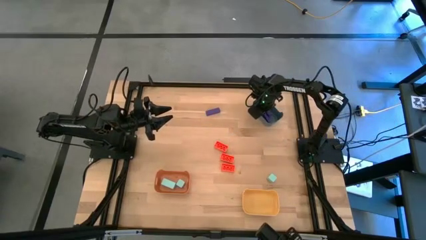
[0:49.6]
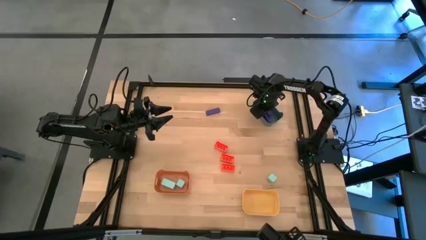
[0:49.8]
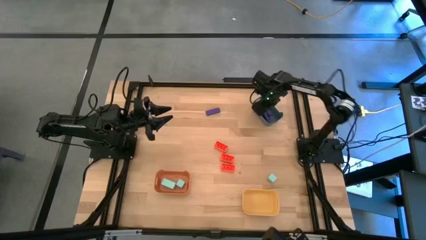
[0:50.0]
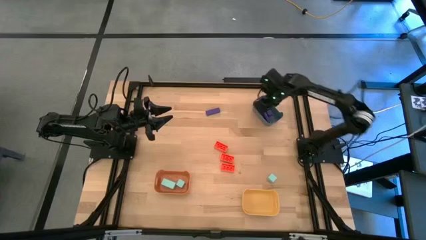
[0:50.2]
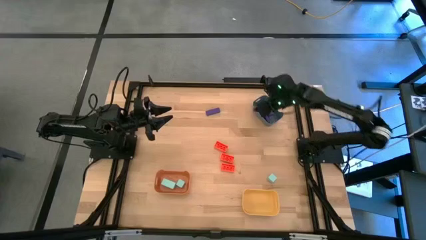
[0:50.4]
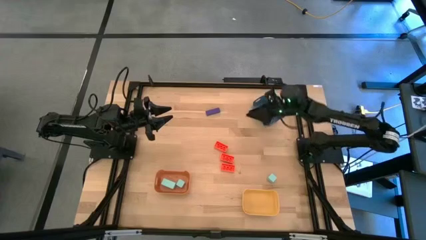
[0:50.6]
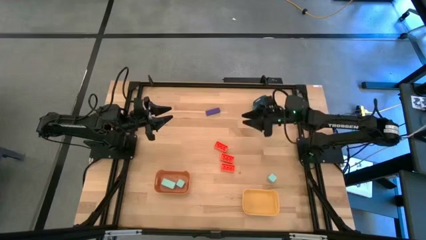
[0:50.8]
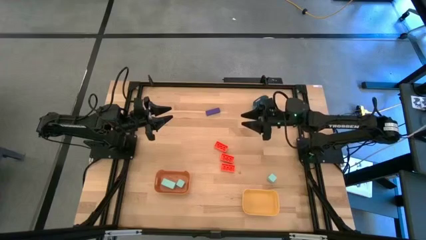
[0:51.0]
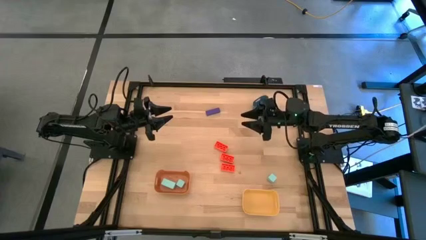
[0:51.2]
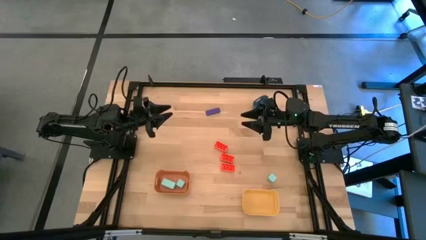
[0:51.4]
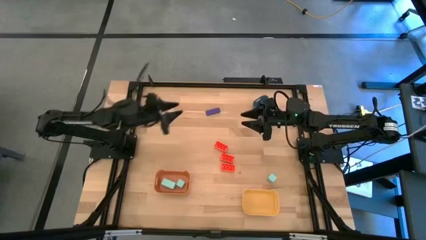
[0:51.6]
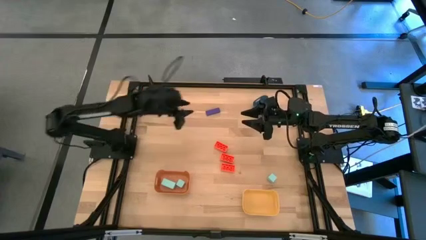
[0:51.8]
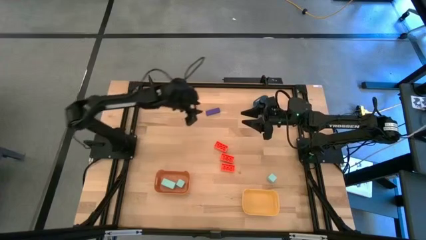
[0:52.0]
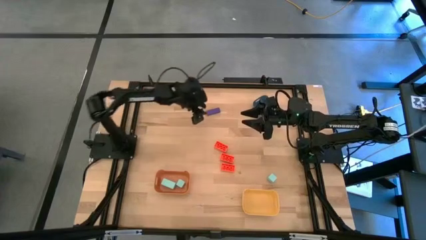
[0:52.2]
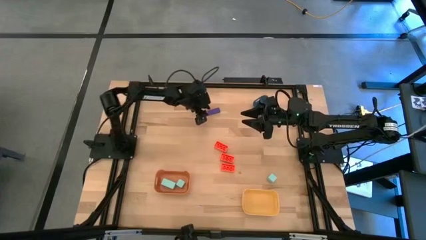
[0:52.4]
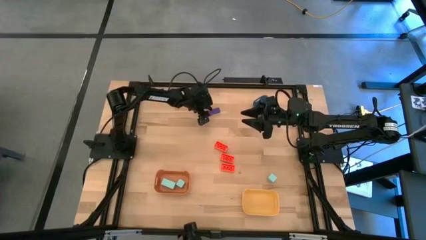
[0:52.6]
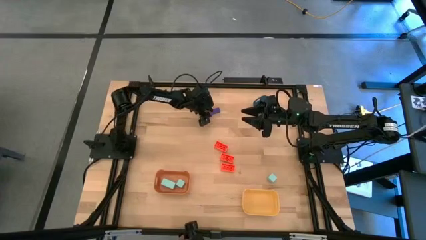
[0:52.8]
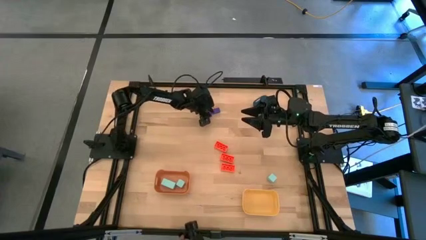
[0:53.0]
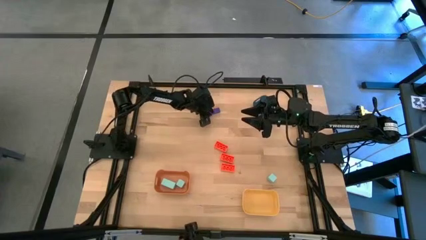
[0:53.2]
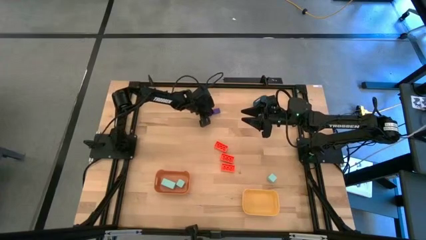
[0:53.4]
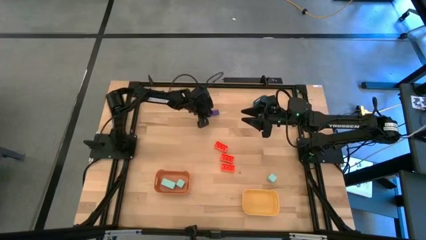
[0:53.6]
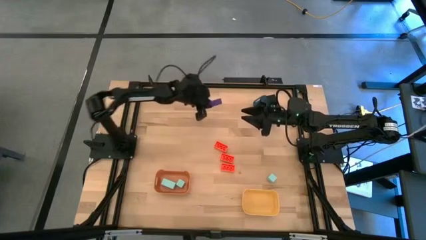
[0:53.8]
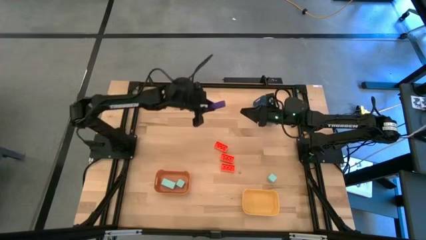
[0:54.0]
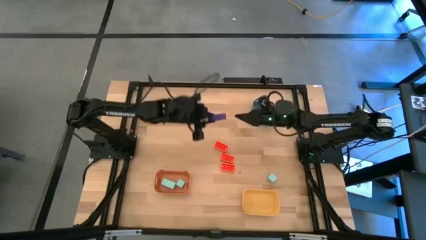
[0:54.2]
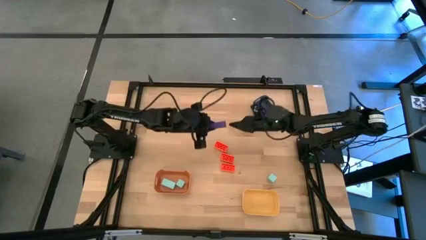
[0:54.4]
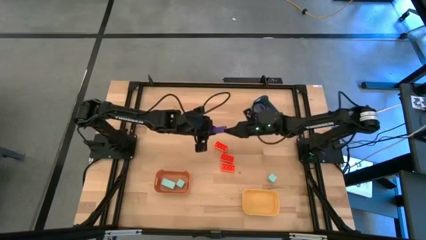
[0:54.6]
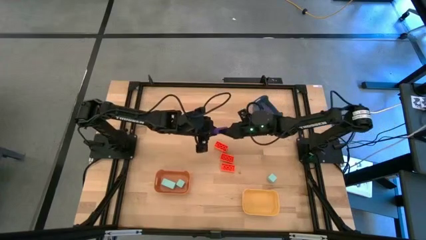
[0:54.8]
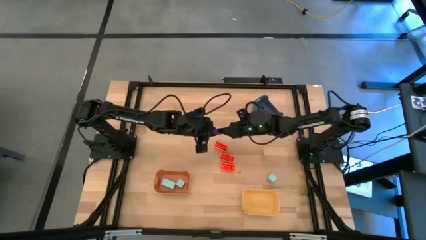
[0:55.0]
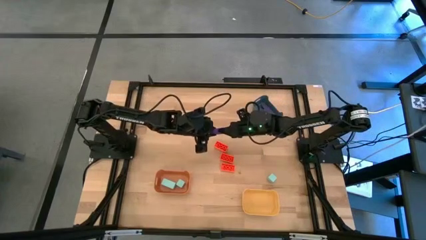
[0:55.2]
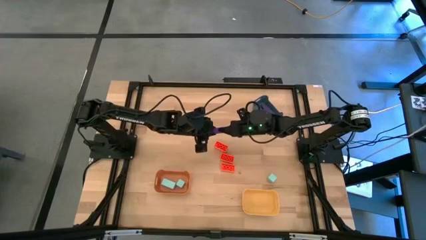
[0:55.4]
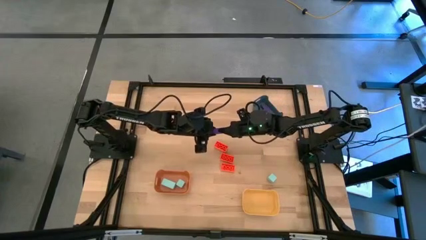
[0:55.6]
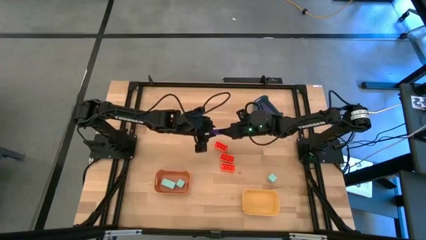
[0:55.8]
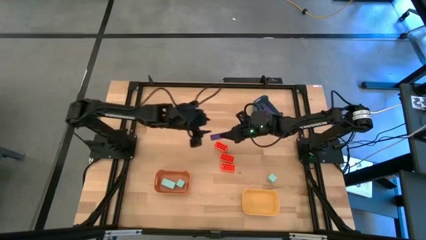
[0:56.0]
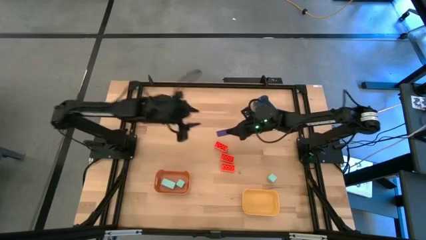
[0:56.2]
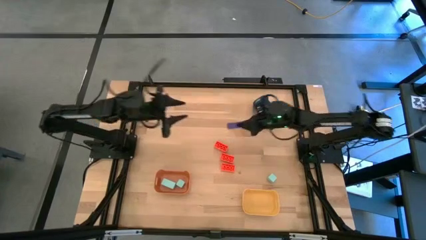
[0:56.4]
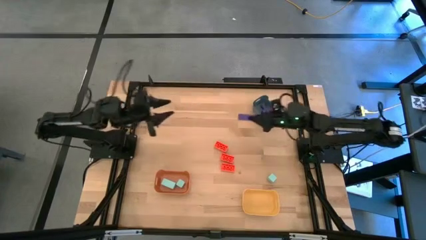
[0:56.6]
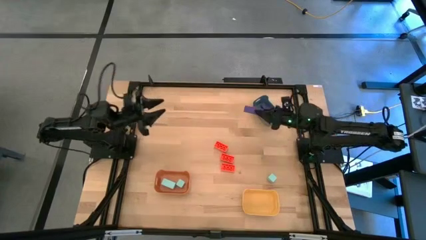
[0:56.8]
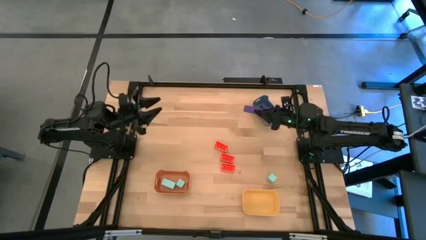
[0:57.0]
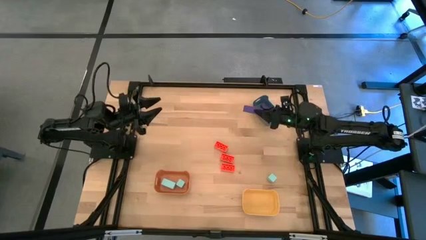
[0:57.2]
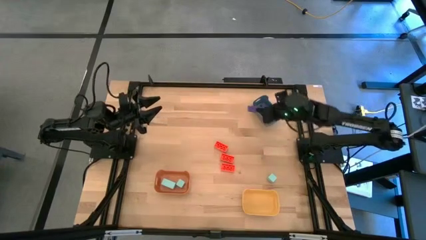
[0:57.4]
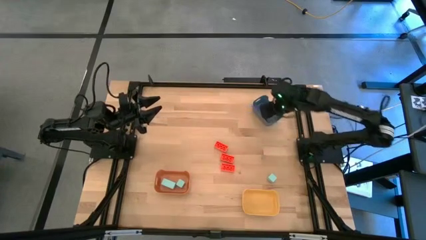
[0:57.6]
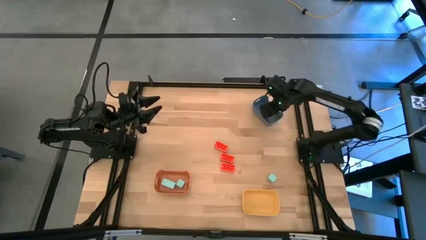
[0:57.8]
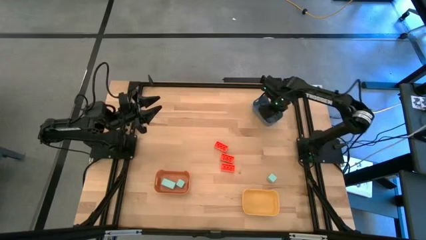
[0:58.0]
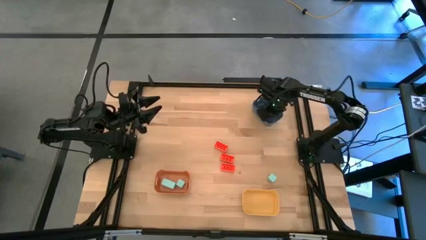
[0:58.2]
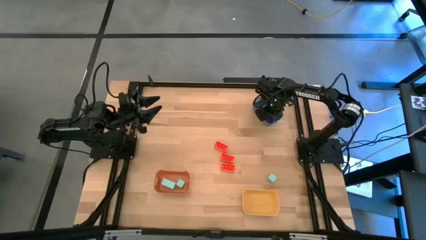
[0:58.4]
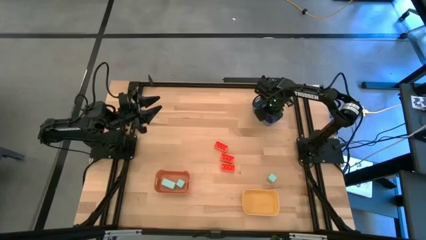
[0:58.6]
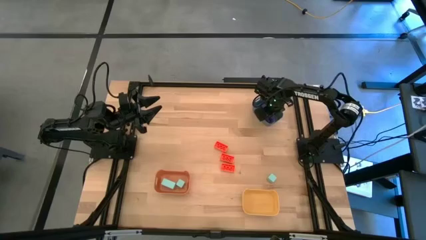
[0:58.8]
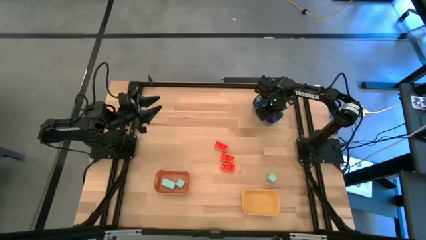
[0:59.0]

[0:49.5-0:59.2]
Task: Sort & place blocks by color
Put the violet block into the gray bin

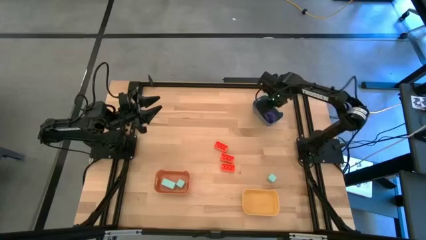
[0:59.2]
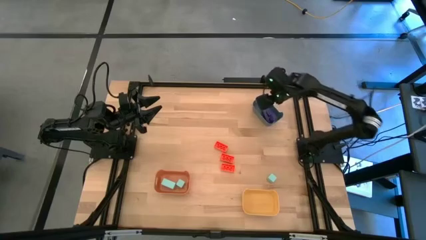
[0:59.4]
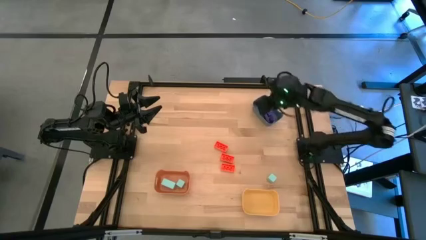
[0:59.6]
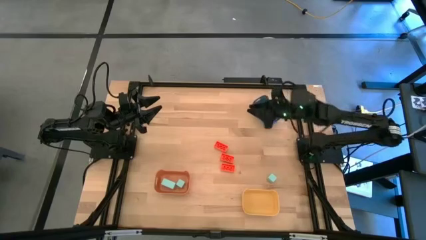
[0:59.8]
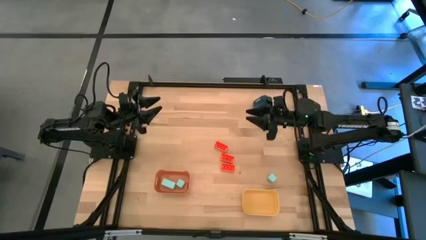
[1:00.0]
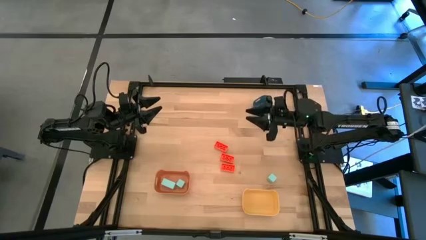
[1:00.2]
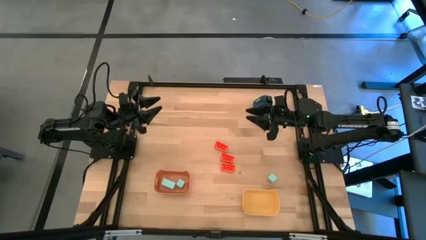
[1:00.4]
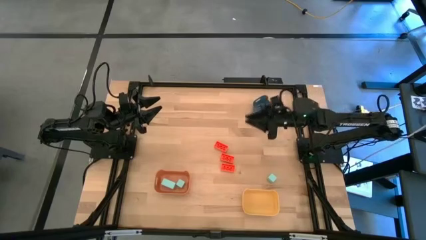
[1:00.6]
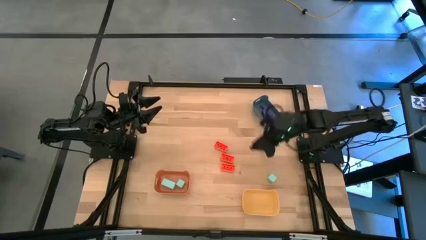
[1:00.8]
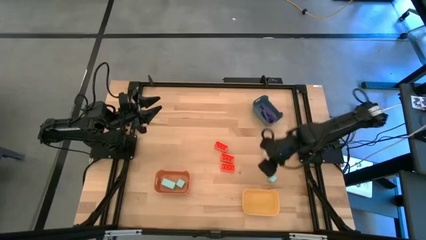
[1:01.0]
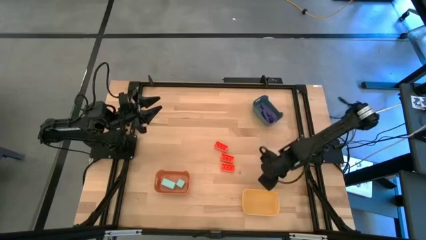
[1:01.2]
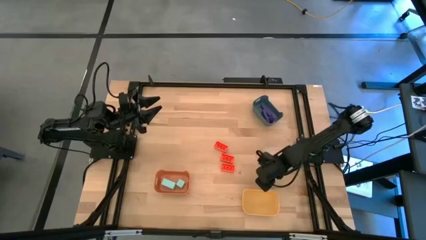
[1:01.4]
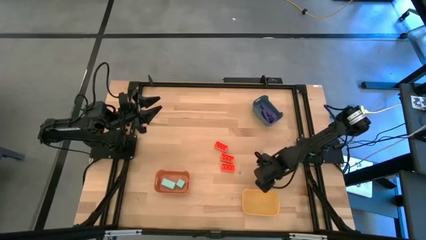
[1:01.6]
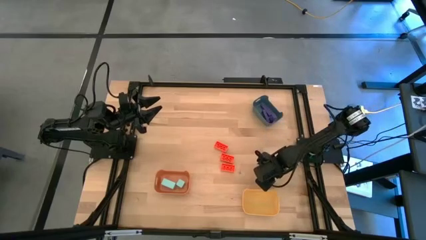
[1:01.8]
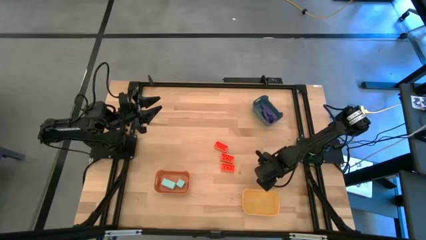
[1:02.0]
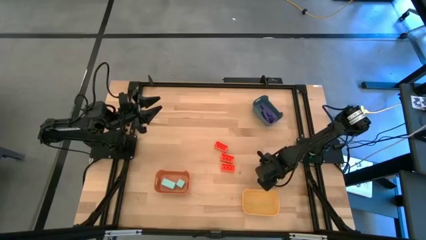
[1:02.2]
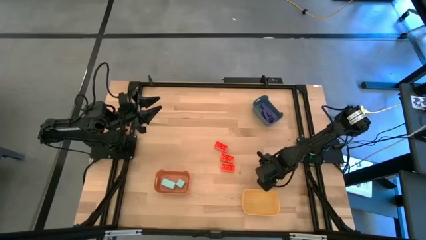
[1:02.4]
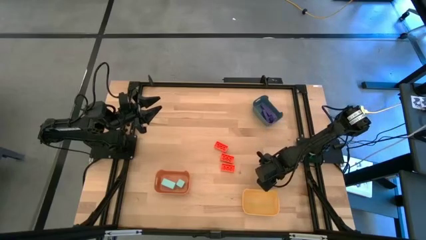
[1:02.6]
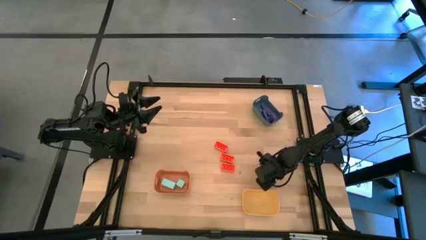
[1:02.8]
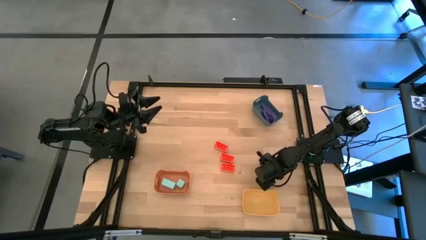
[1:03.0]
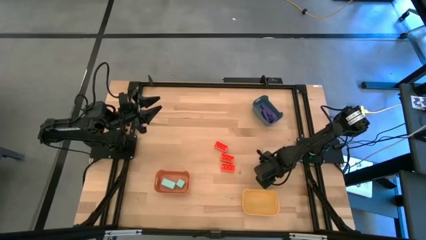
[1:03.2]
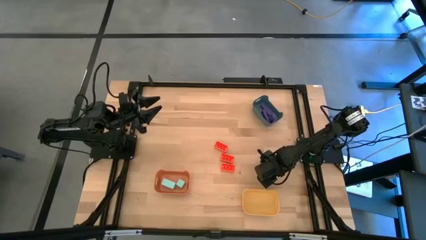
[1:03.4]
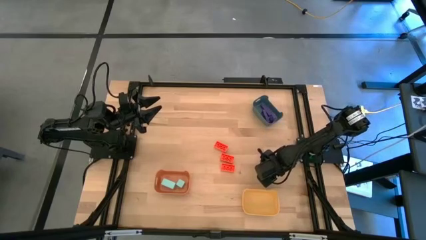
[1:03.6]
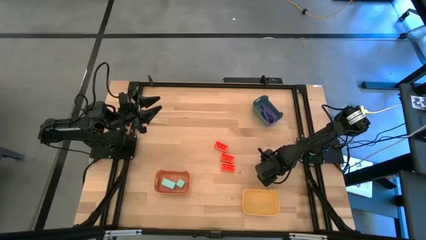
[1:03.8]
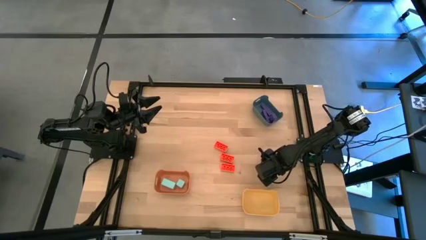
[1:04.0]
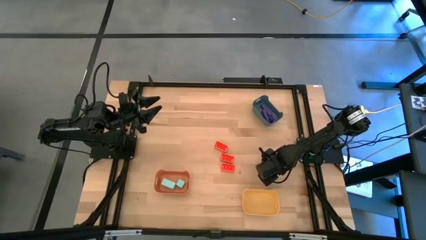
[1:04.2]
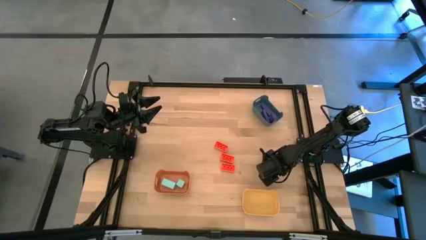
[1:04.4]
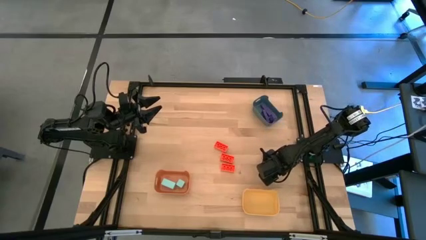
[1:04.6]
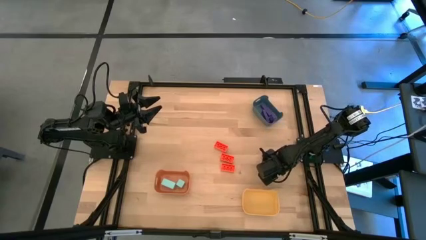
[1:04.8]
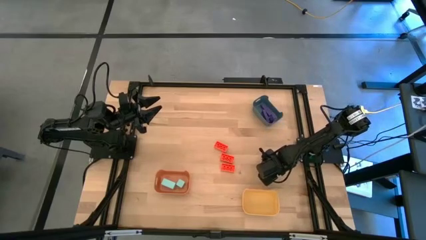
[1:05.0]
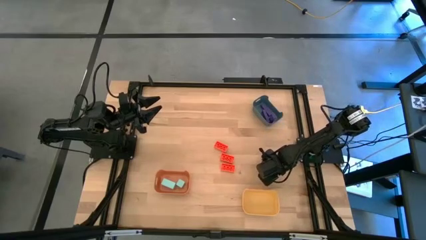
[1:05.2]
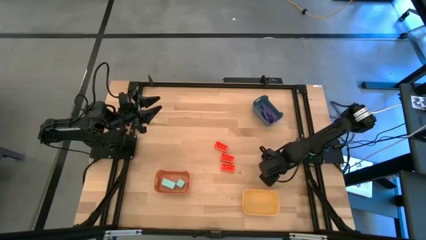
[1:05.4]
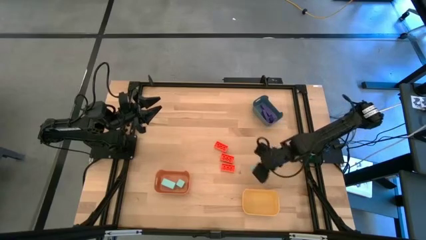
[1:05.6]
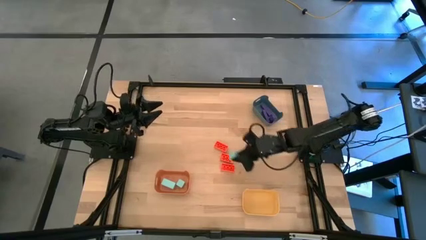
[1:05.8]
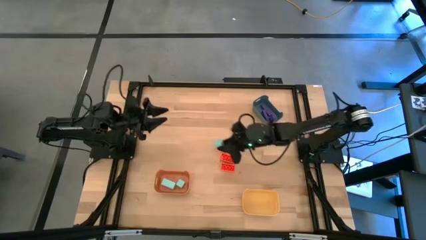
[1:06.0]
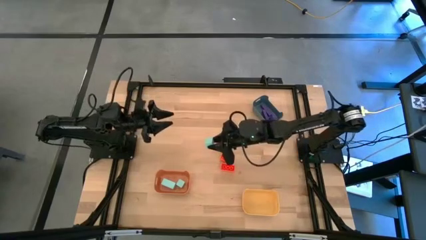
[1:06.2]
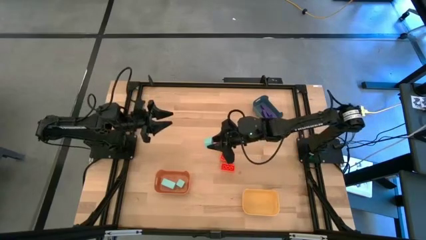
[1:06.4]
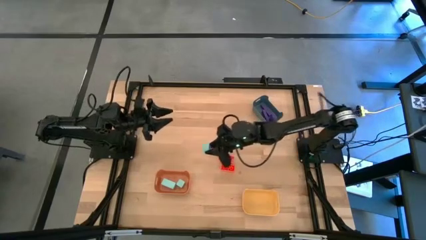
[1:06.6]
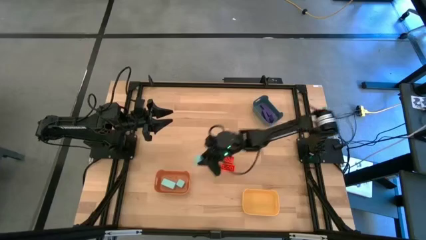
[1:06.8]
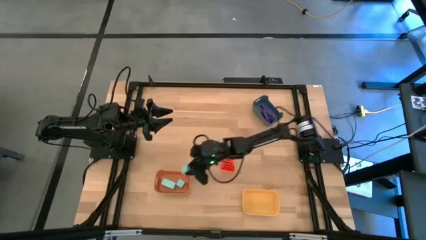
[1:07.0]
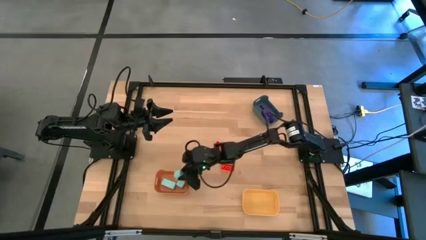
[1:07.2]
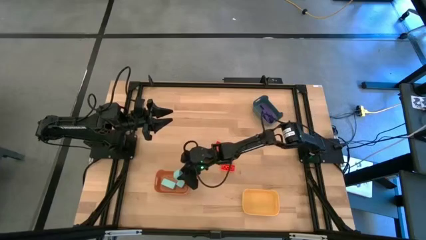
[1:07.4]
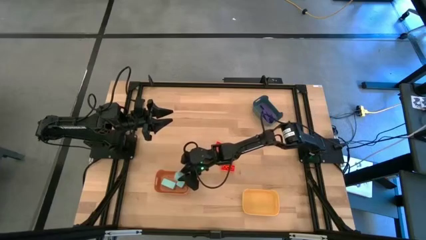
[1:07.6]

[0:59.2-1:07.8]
Put the light blue block into the brown bin
